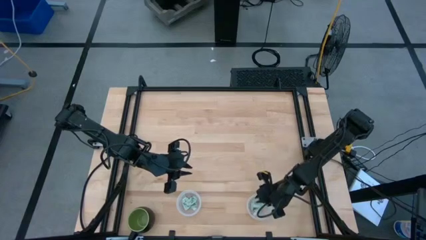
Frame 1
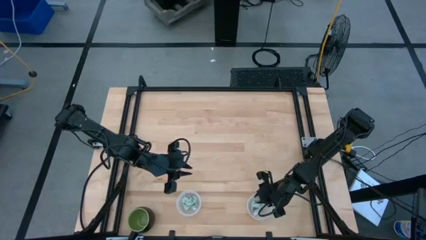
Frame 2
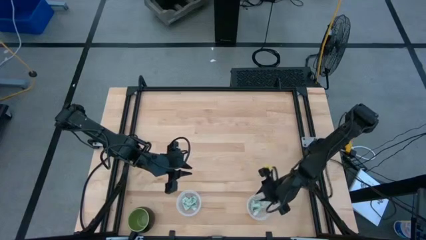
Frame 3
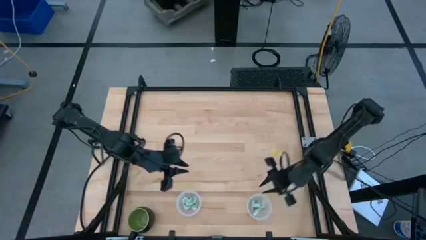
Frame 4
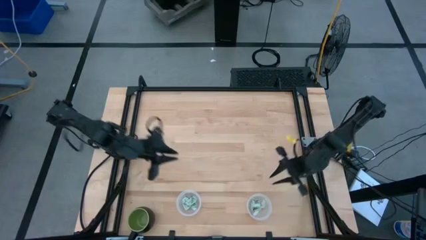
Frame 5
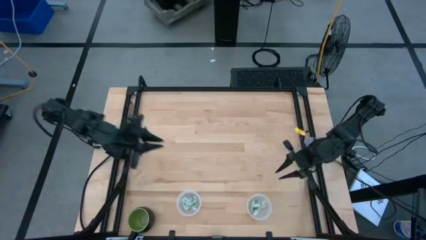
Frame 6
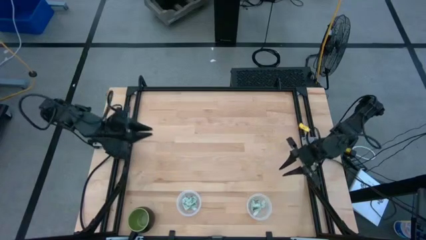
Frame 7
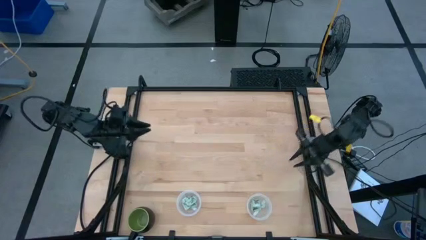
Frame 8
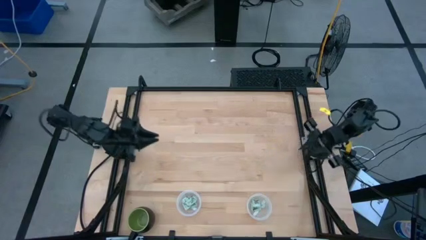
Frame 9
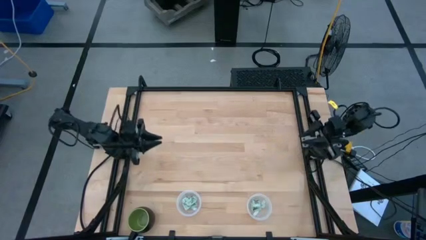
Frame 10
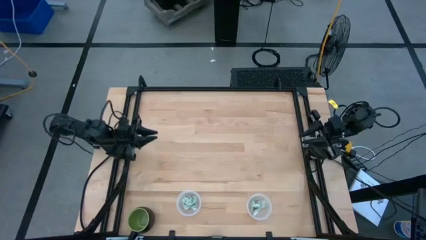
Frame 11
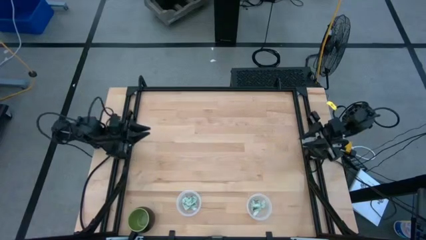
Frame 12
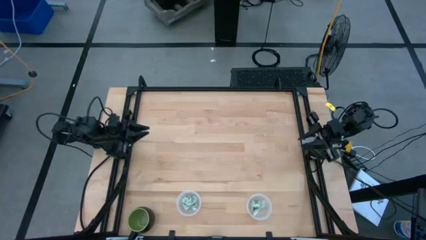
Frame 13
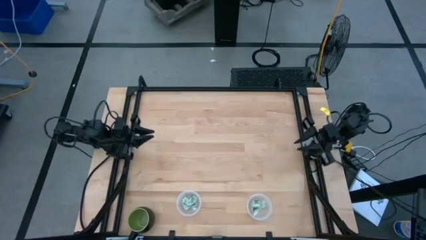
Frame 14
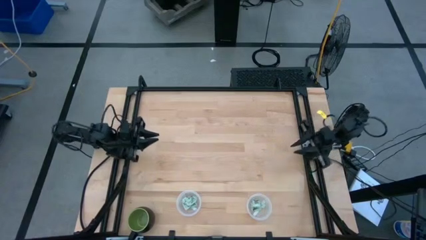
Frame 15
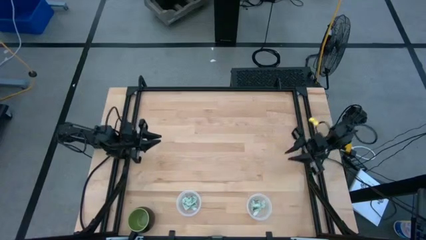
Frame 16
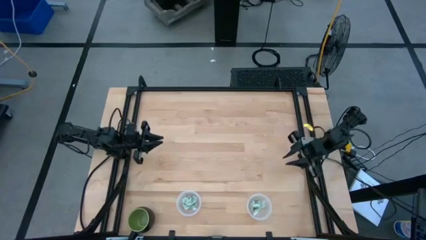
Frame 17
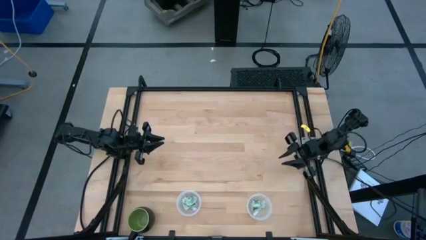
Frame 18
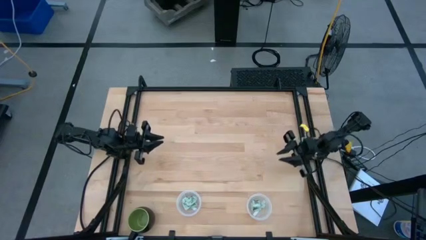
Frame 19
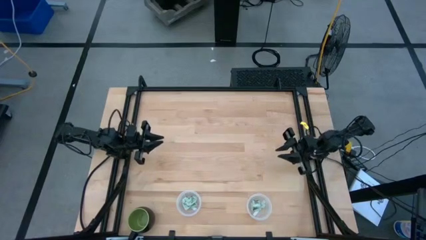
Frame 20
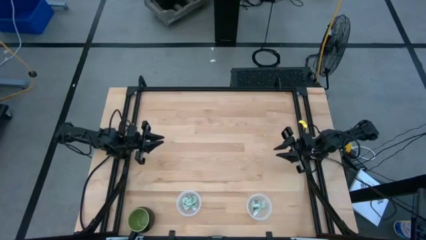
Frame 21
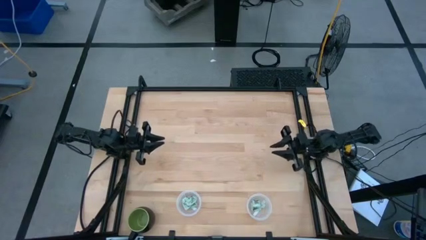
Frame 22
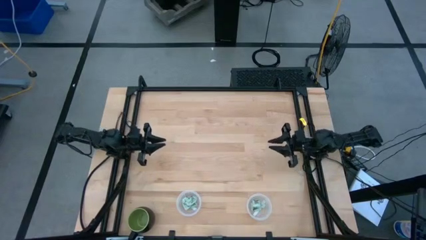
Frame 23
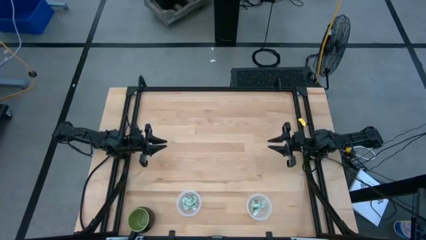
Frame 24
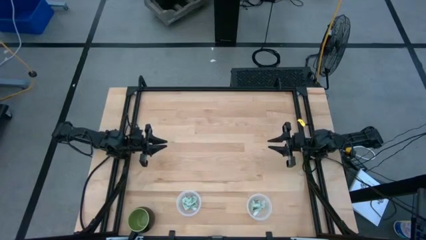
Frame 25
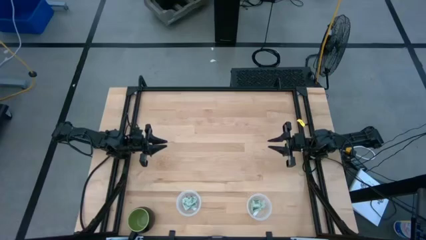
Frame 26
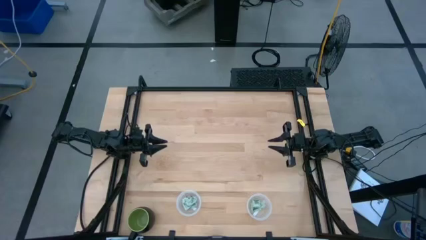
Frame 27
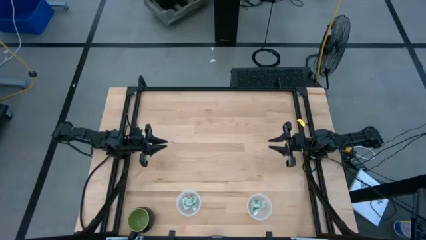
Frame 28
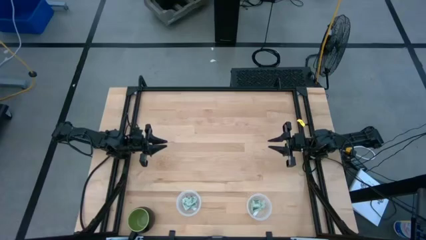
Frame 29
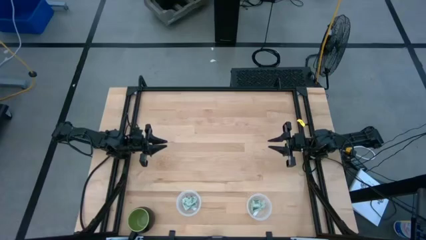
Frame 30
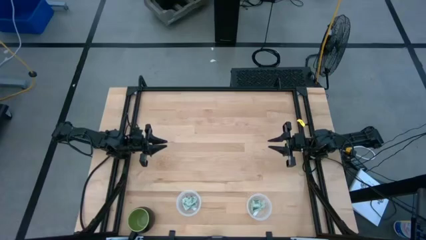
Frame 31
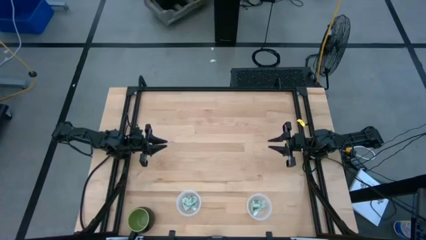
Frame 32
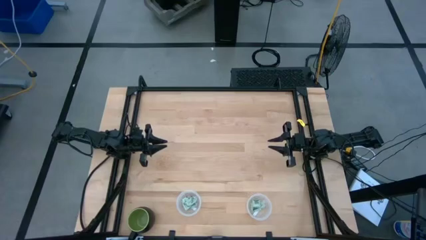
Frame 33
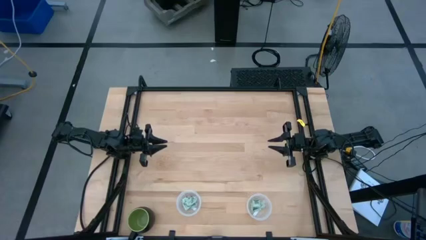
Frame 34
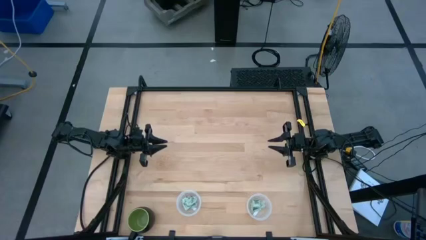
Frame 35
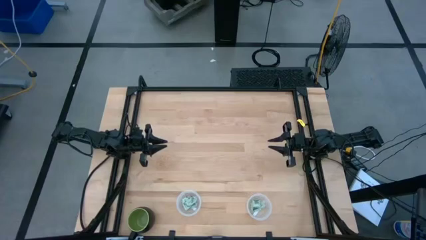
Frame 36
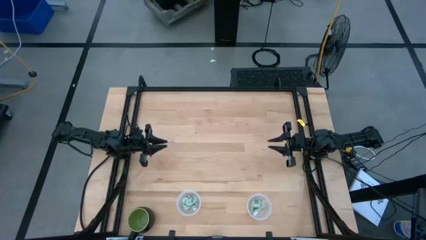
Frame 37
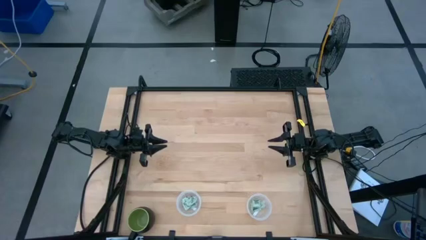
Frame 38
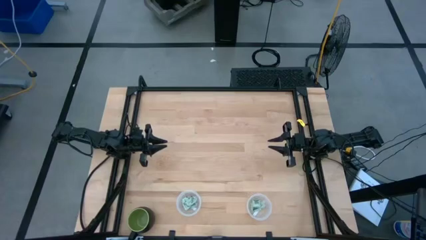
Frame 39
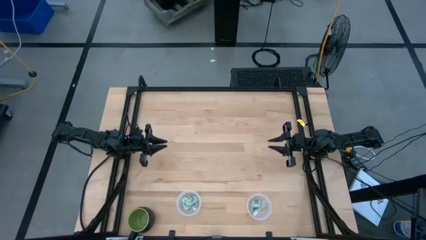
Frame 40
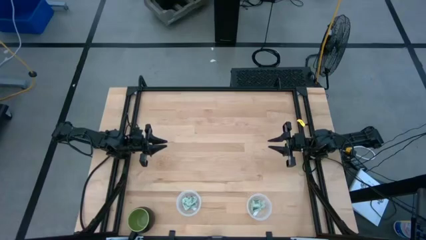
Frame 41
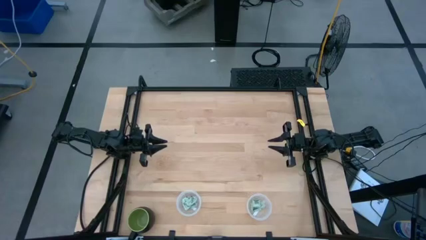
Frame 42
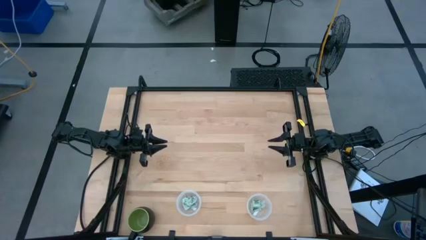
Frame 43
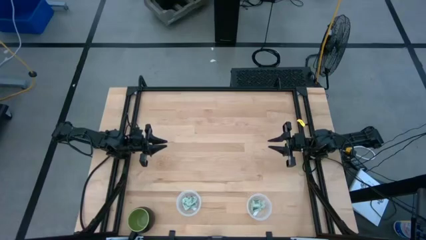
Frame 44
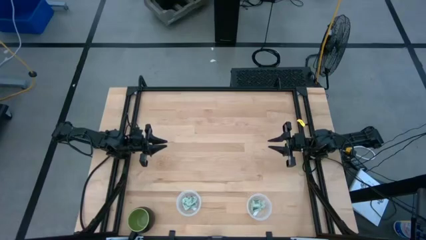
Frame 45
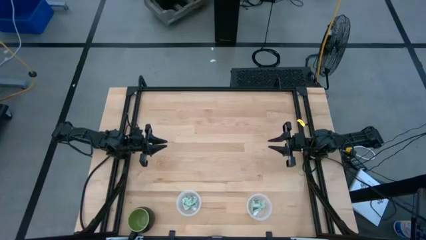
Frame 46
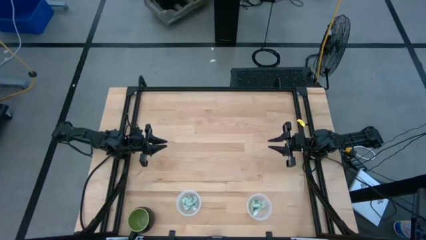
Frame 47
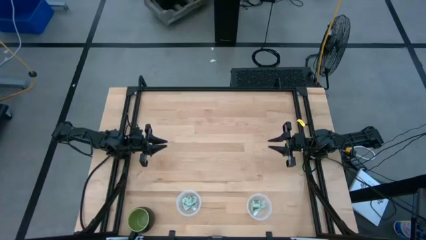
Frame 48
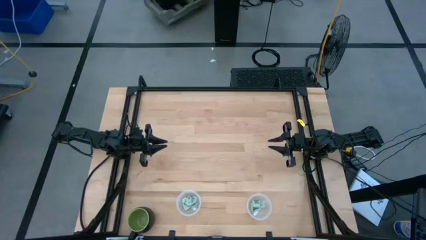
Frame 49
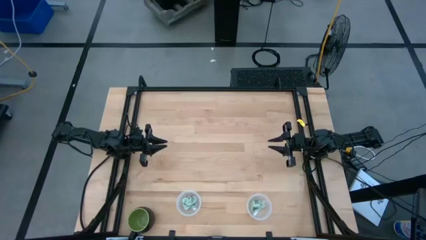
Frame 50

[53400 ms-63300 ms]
Task: Pick and place Stevia / Truvia into bins
Return to Home Position

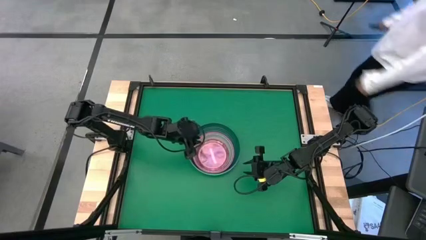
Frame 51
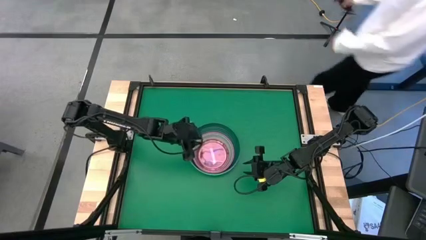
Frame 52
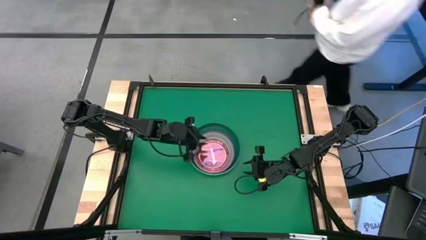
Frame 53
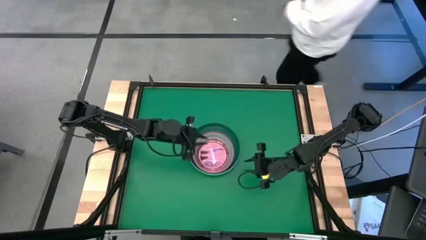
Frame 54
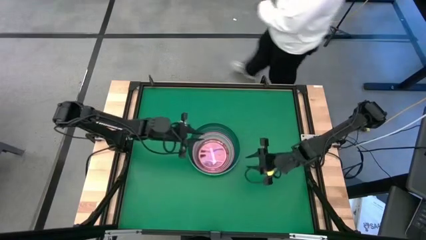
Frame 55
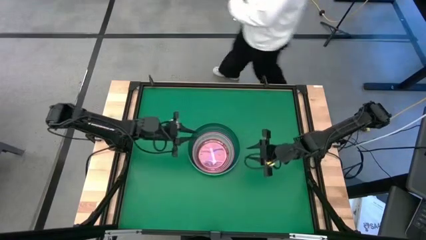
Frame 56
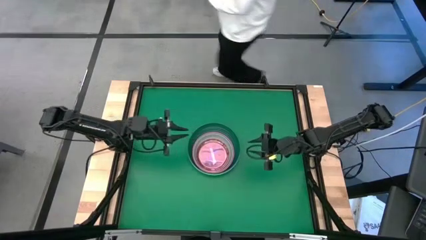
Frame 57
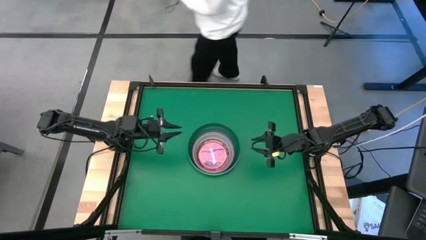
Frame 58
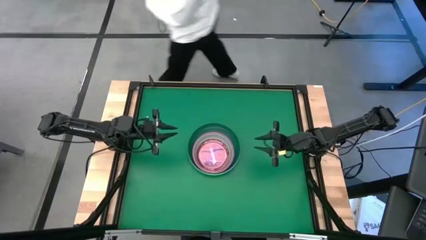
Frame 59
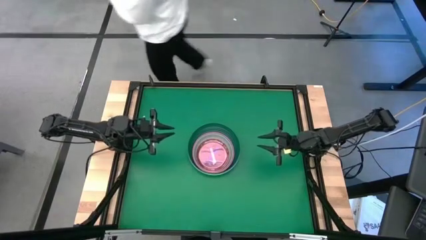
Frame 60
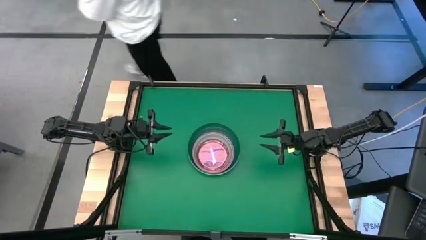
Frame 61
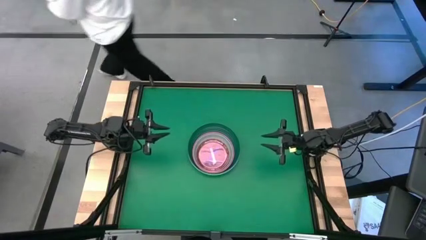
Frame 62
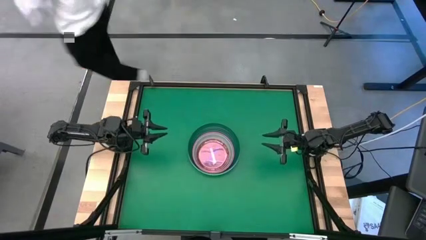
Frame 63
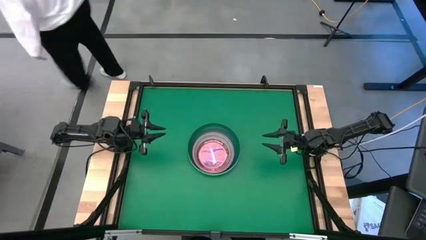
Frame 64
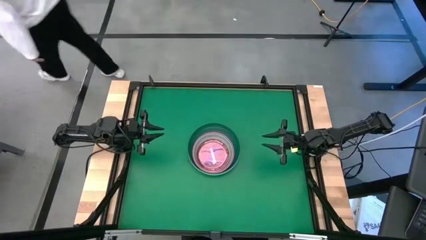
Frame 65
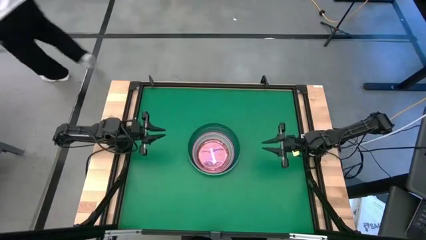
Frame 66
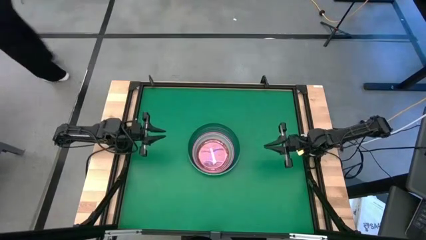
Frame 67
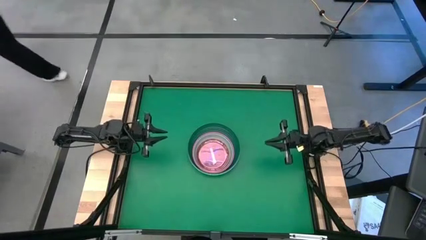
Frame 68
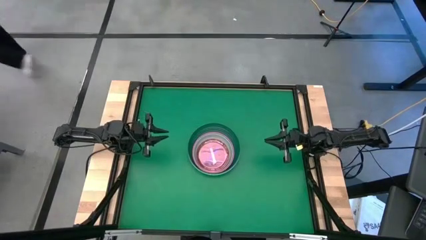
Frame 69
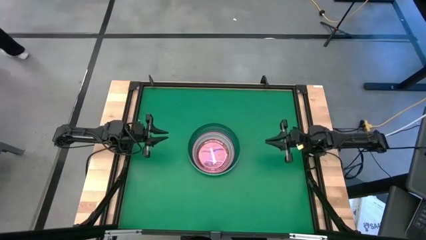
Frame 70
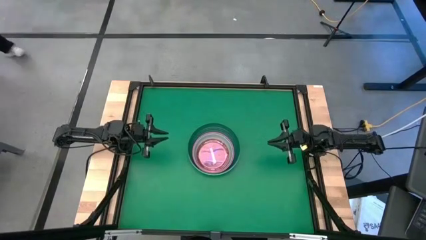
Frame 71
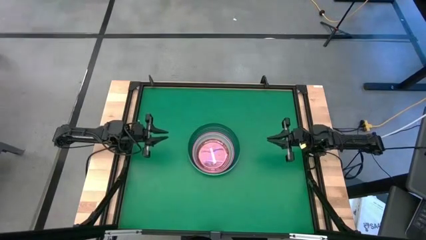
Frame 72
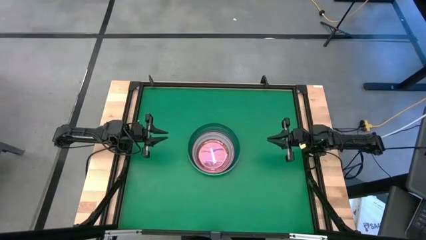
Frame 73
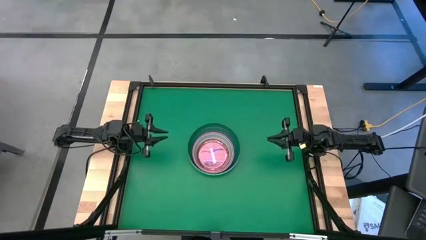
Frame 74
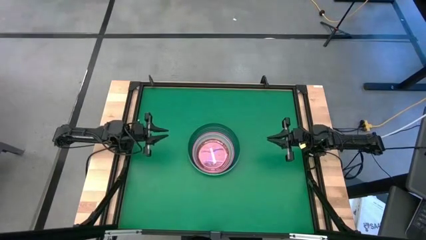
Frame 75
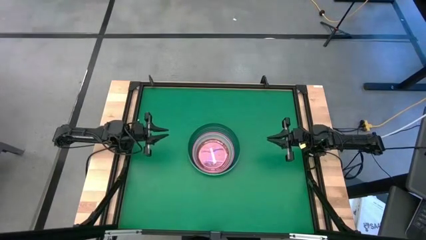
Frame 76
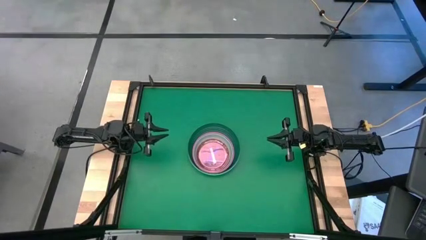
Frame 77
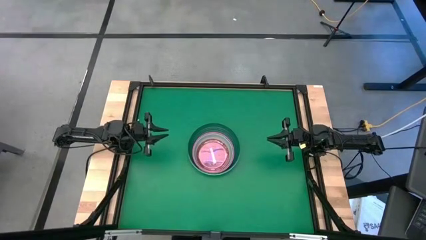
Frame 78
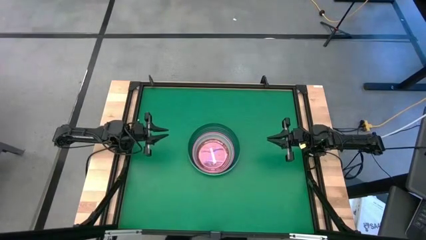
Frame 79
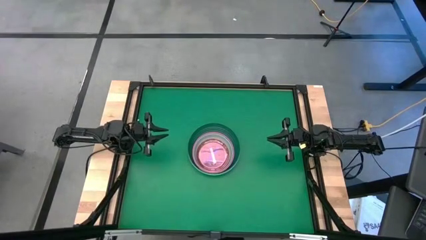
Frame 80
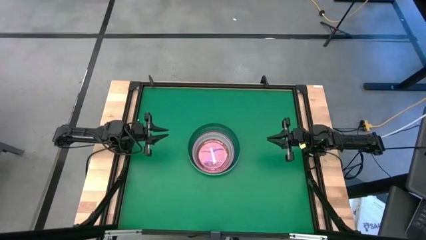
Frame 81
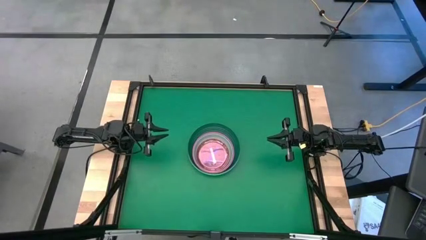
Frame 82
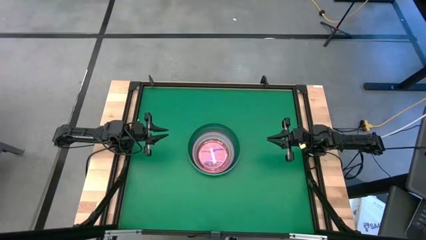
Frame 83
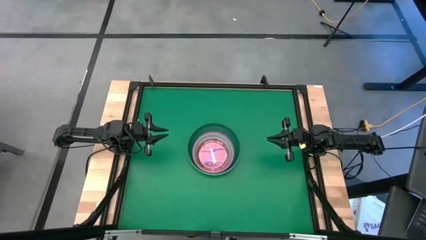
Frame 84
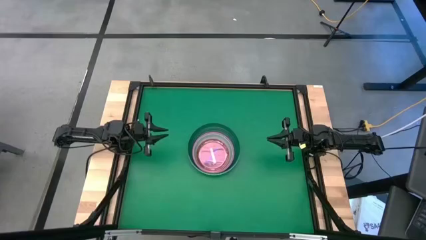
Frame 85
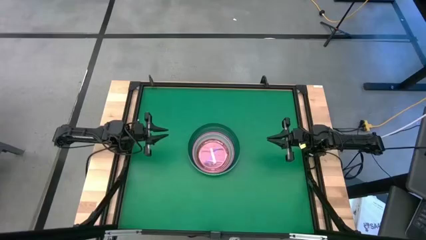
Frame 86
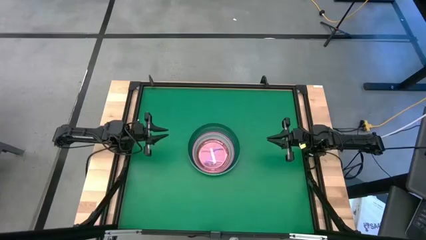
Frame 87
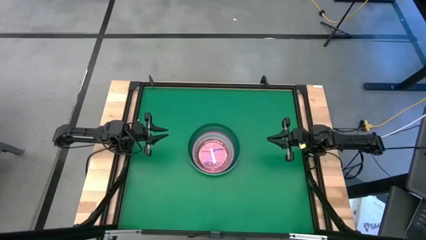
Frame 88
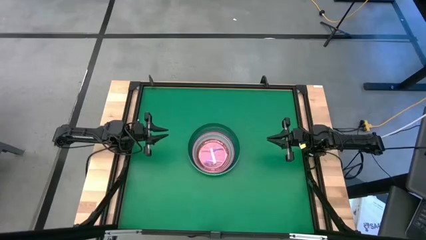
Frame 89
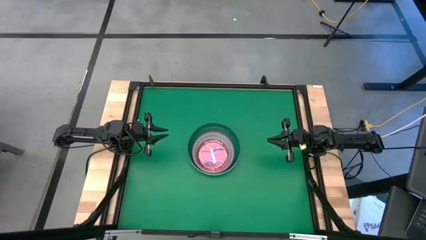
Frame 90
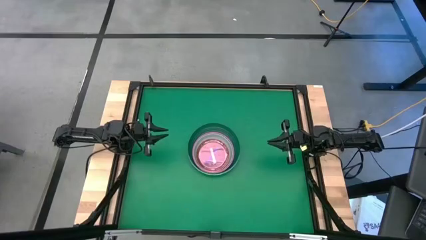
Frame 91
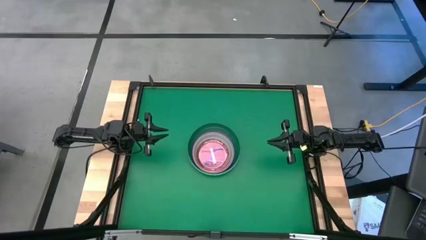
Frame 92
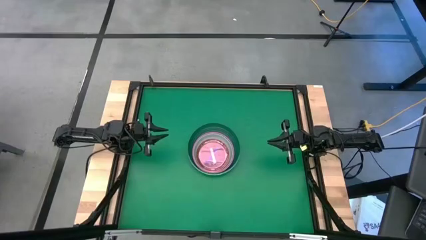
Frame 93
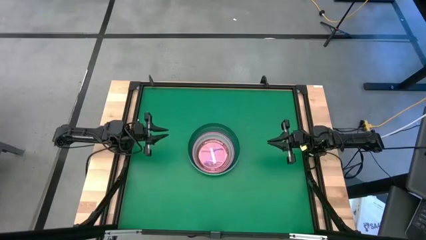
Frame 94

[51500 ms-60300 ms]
Task: Stack plastic plates
Return to Home Position
